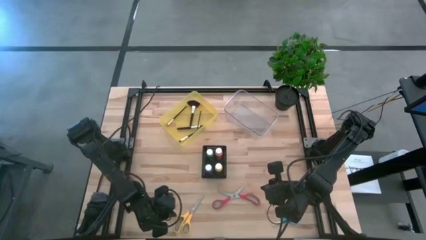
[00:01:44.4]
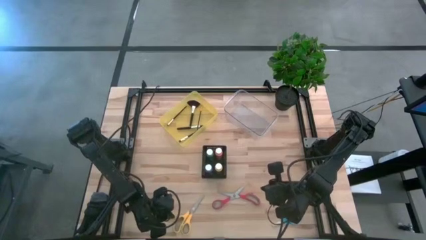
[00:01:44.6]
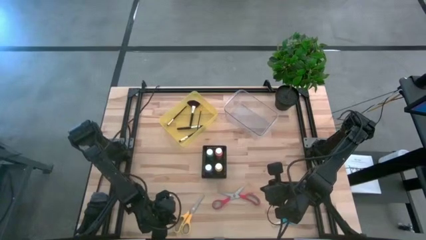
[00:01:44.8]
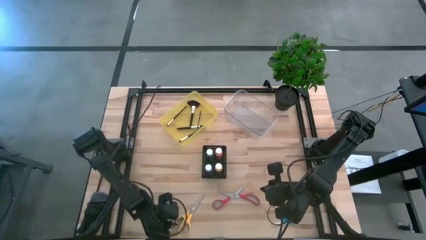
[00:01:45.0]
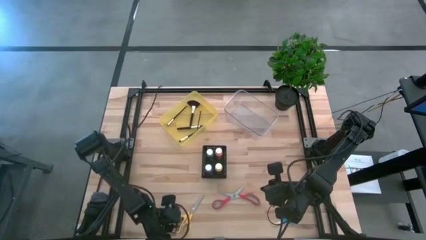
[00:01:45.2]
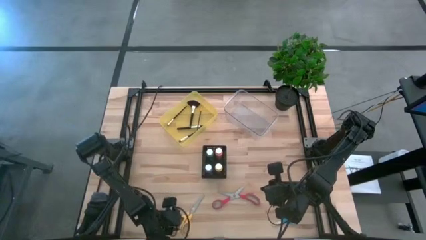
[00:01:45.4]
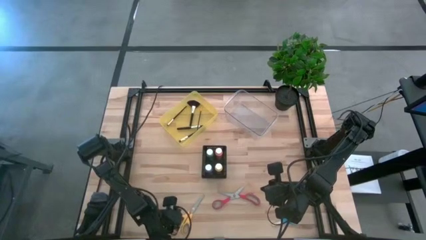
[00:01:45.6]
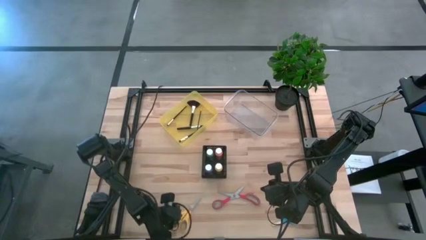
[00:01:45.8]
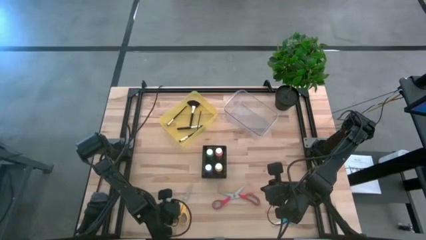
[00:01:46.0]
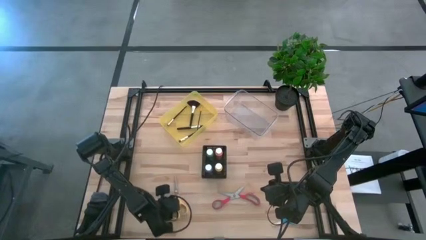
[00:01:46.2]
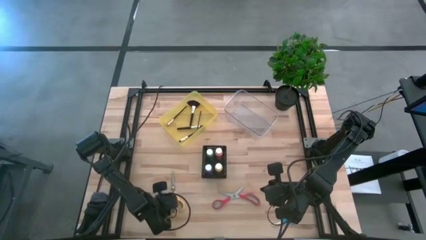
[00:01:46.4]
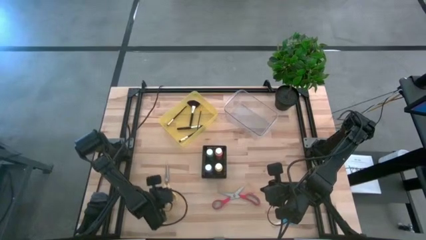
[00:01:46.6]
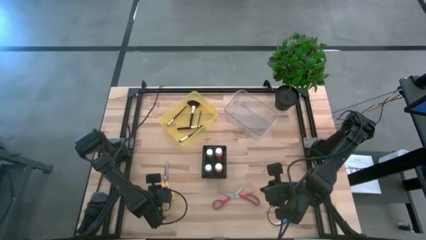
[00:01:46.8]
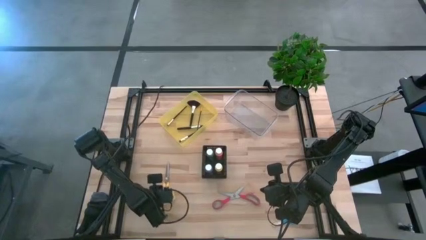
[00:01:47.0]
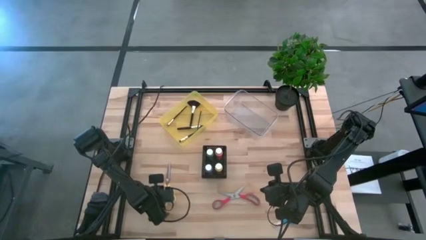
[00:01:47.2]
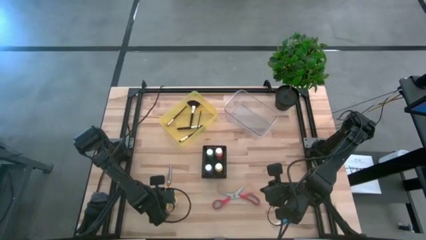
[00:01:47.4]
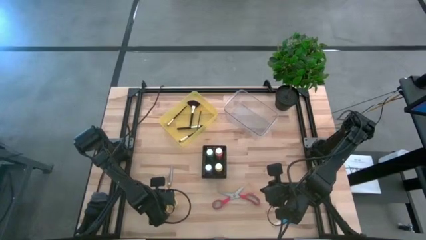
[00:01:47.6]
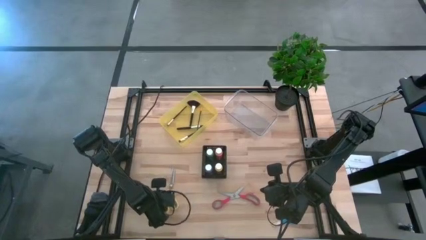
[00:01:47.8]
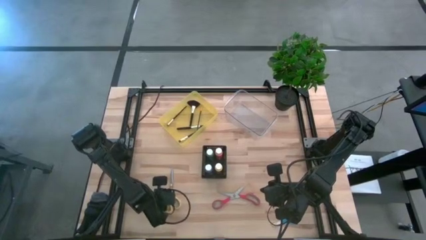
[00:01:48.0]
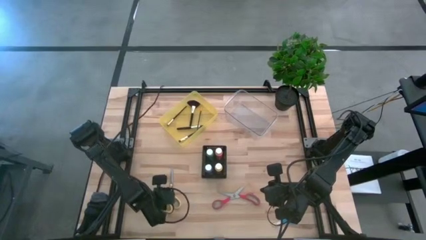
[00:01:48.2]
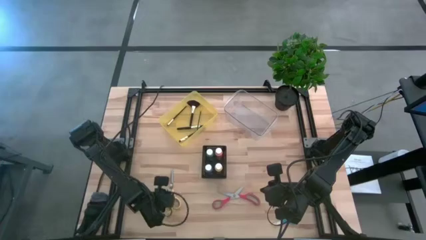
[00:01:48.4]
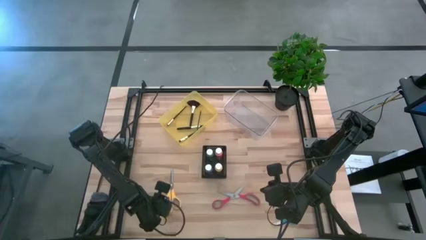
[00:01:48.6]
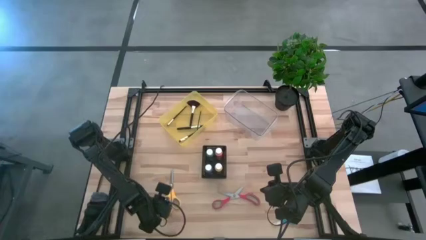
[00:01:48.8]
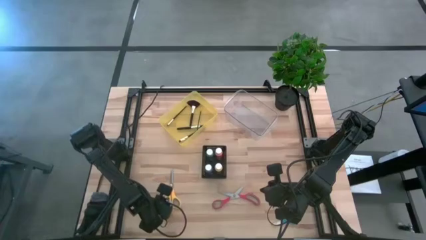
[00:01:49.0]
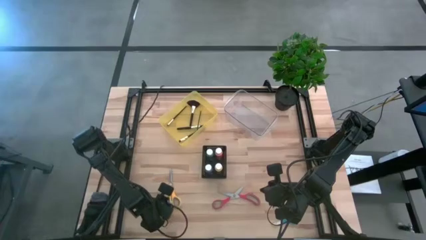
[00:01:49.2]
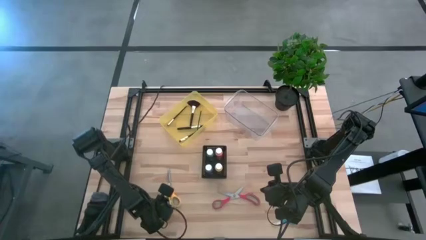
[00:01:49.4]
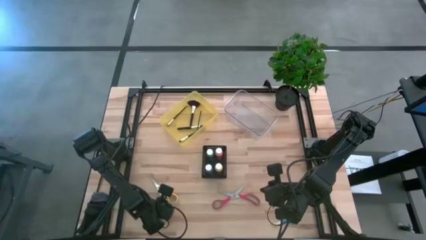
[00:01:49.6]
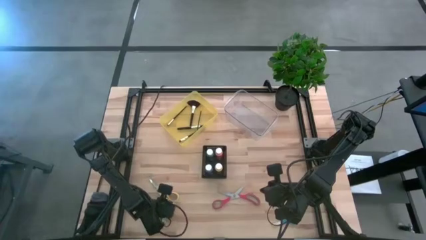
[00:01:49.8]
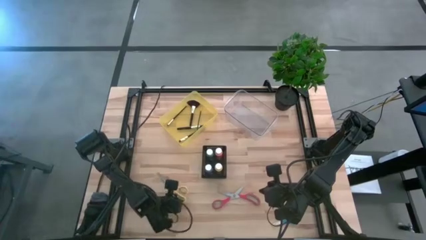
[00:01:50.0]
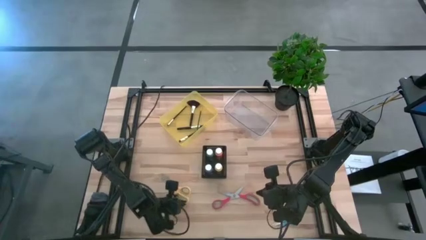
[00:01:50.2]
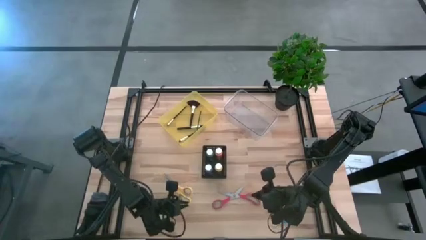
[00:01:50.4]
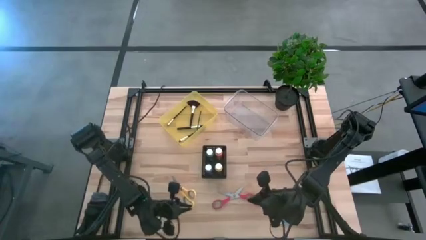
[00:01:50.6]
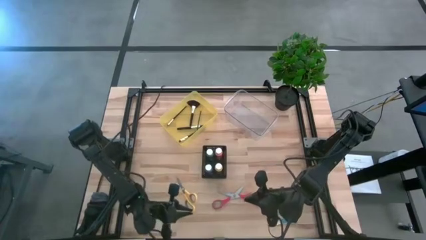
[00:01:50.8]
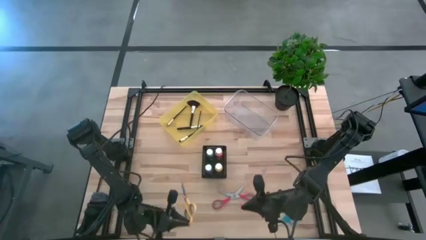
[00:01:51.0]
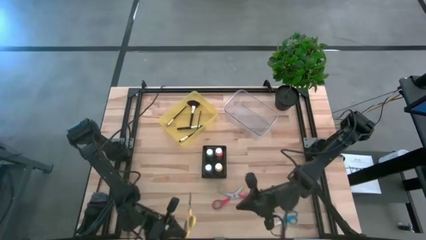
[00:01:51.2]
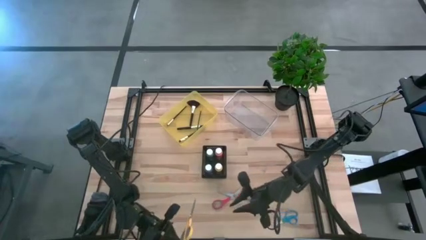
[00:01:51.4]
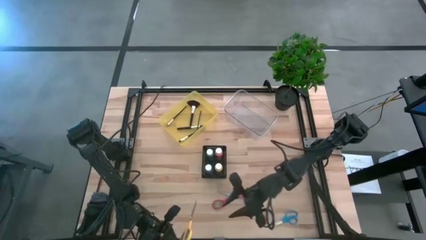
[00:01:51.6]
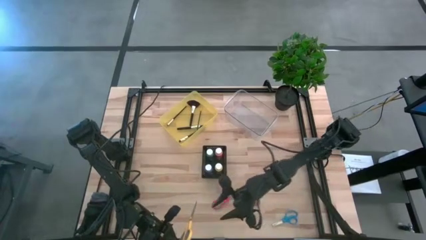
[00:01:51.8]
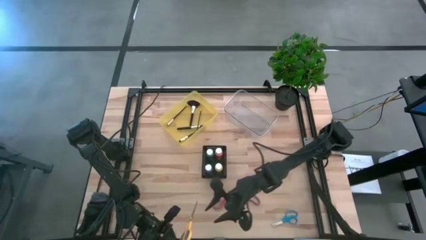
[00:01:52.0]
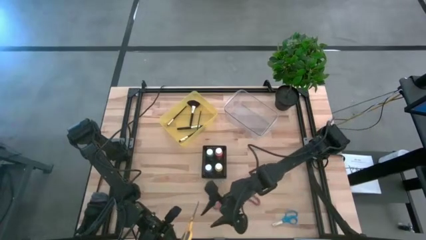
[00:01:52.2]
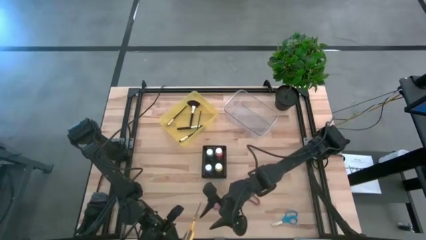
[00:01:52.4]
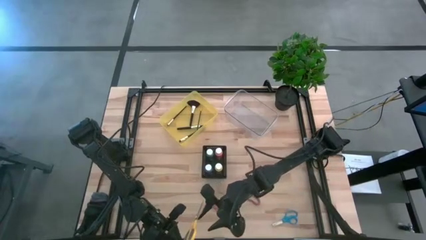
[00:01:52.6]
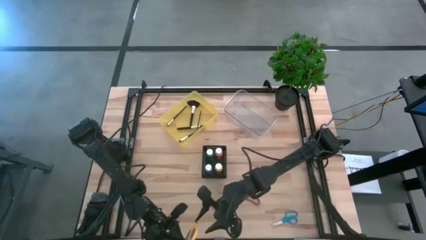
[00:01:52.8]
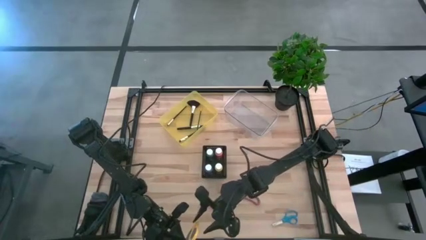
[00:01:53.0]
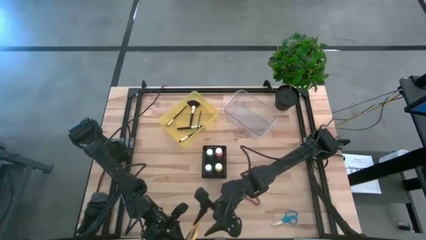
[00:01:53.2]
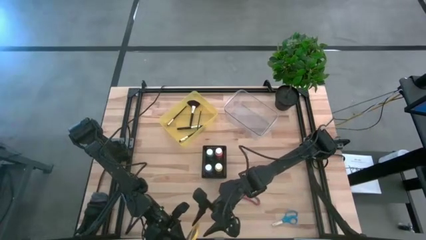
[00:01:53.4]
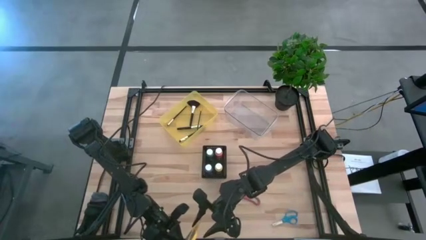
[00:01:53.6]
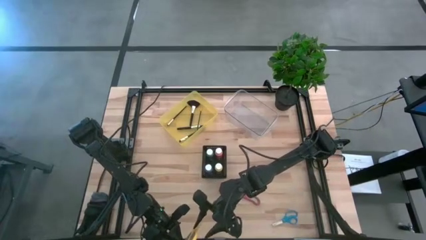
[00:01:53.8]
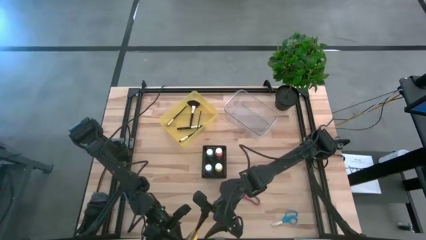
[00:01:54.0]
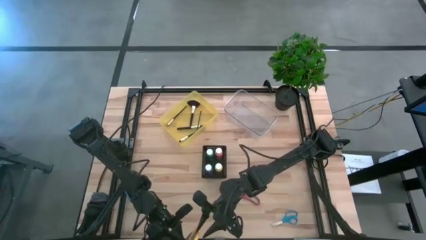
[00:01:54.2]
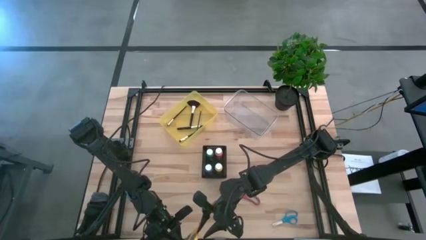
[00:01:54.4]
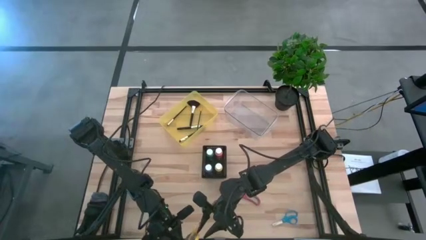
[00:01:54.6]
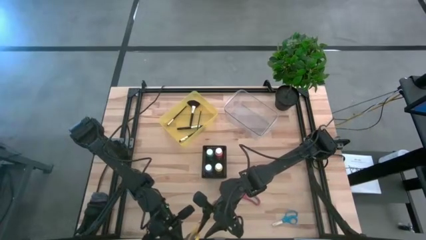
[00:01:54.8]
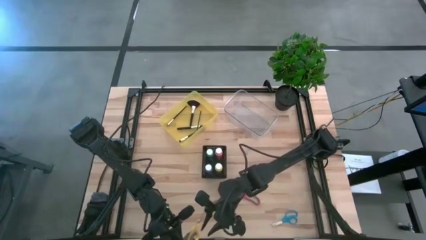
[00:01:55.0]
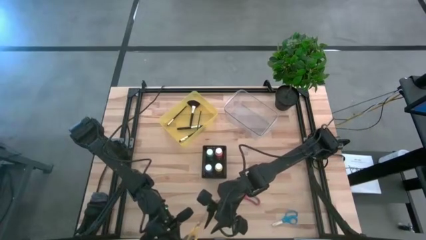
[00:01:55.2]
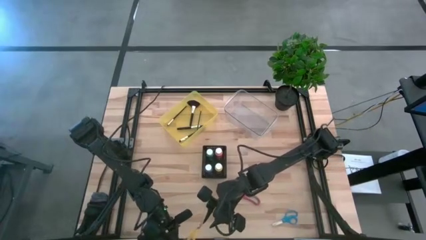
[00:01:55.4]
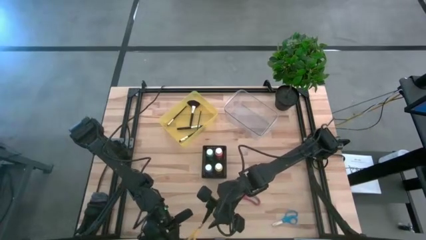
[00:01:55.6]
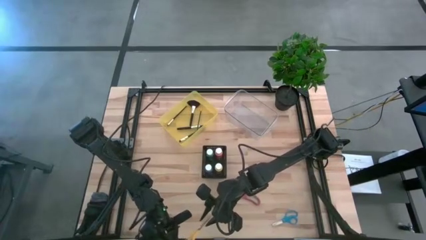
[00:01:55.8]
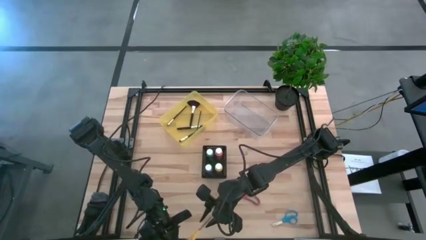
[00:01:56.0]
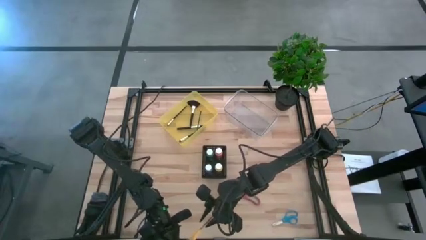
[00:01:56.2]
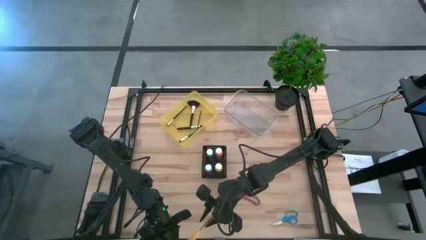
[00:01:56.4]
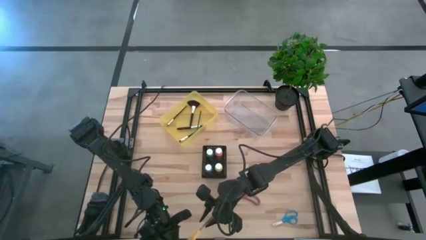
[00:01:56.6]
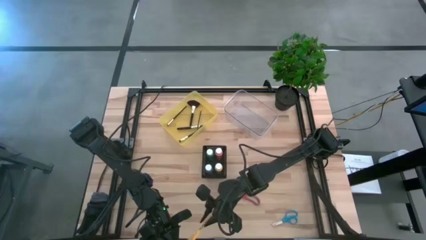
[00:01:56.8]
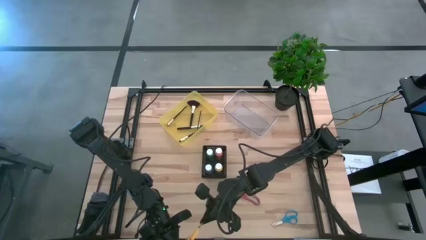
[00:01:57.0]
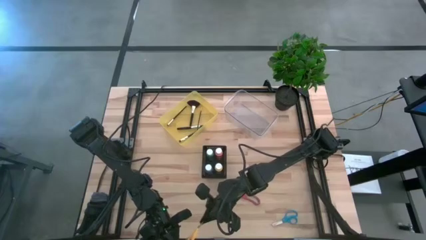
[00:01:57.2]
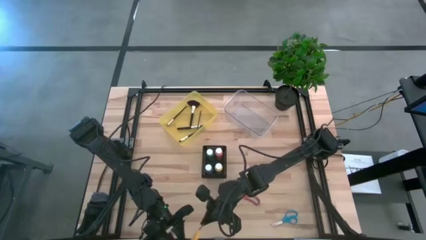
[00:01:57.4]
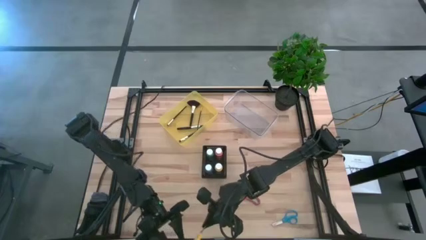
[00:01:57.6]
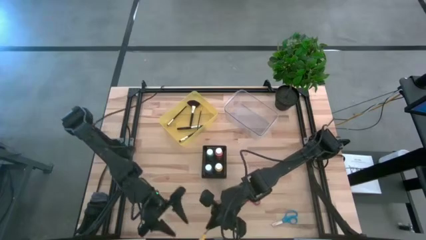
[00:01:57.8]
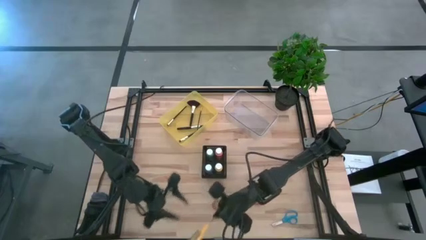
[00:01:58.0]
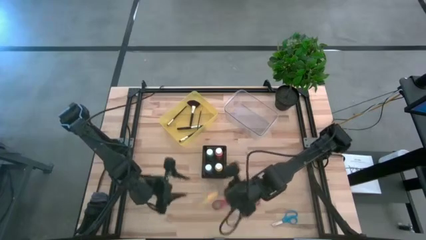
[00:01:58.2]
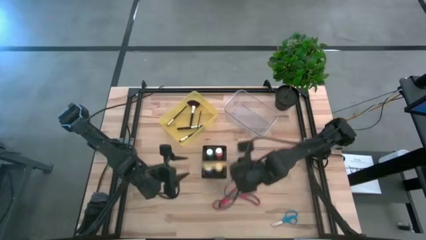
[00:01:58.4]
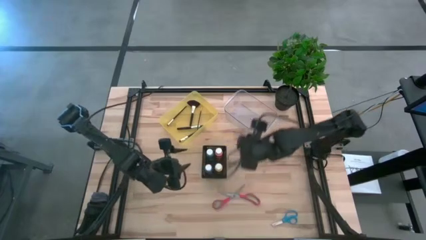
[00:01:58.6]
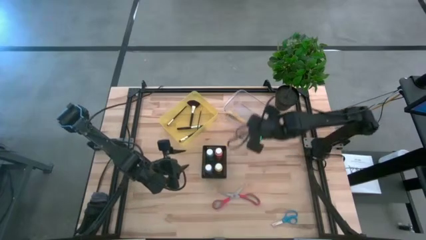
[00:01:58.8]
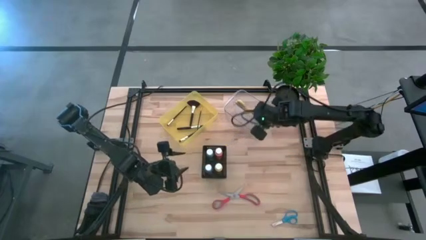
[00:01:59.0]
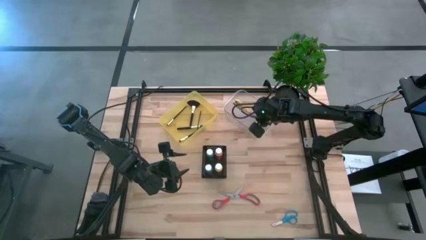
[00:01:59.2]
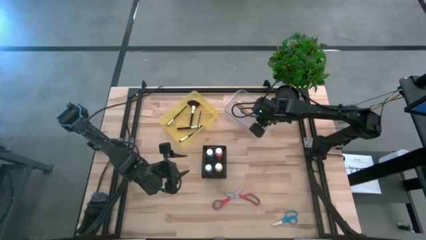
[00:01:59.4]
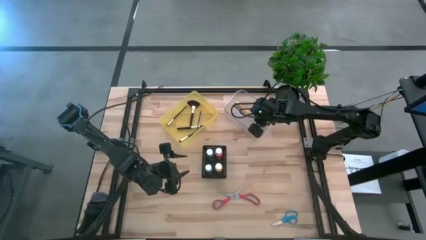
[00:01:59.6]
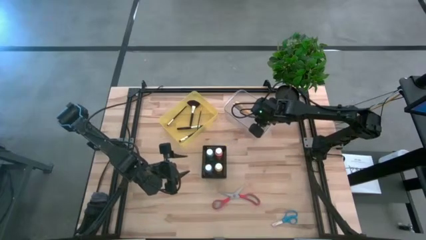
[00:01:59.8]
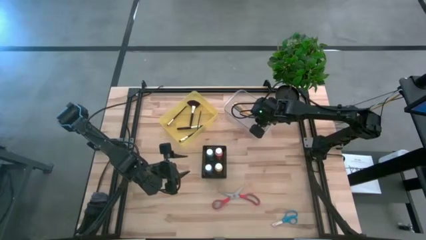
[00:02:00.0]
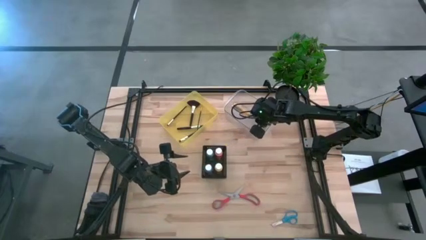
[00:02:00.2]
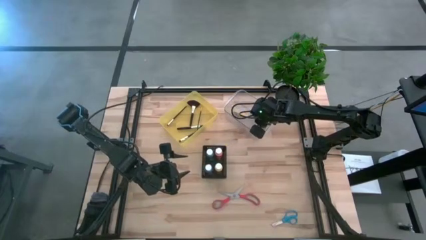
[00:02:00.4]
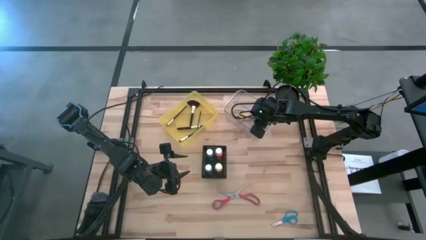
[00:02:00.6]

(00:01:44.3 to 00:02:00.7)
Task: Pick & Place Paint Supplies
Put the yellow scissors into the transparent bin
